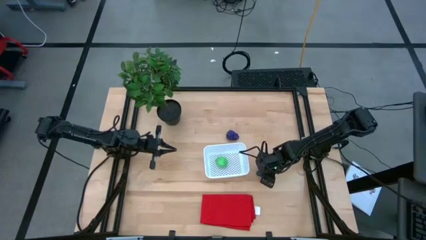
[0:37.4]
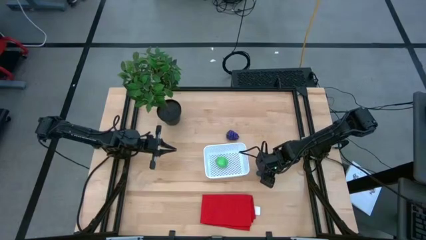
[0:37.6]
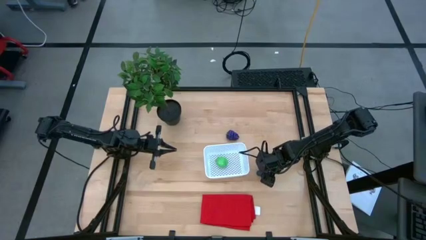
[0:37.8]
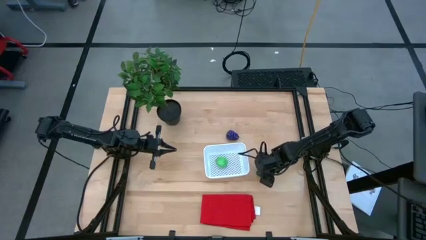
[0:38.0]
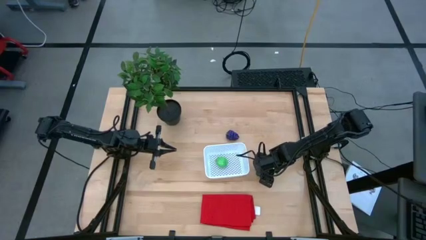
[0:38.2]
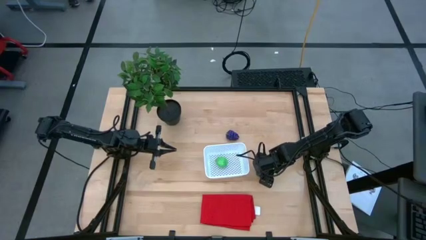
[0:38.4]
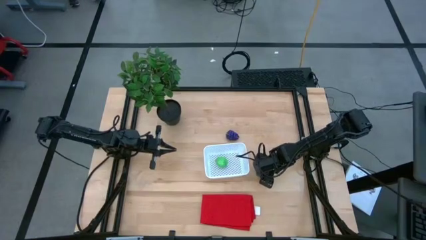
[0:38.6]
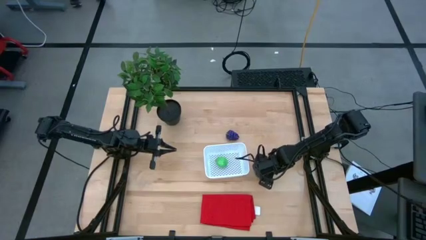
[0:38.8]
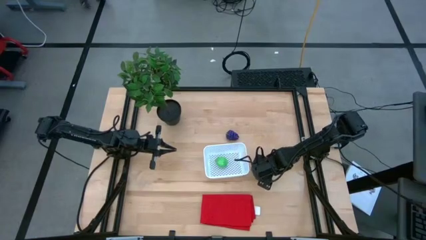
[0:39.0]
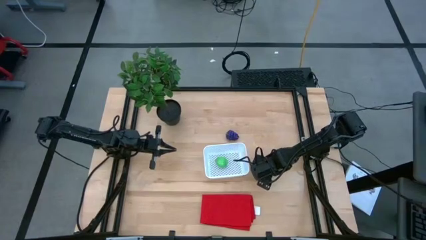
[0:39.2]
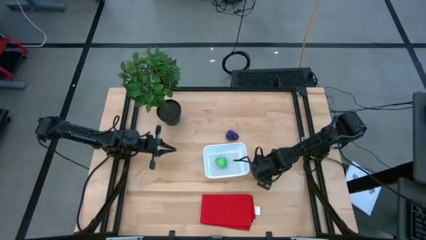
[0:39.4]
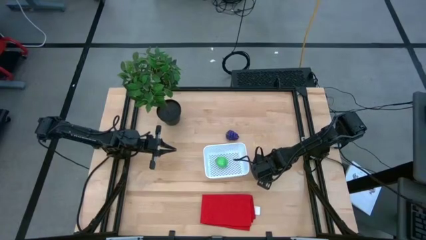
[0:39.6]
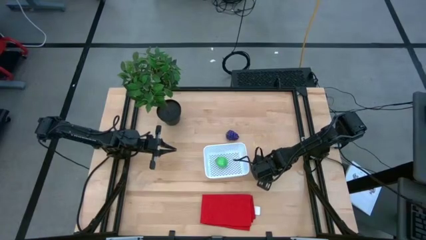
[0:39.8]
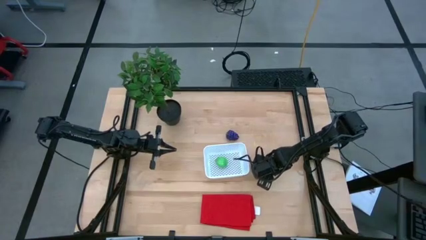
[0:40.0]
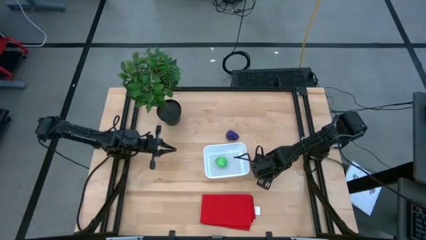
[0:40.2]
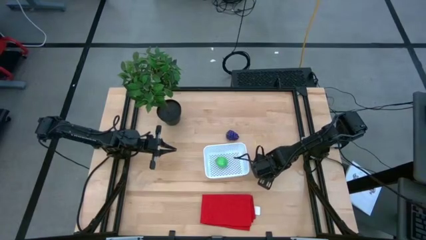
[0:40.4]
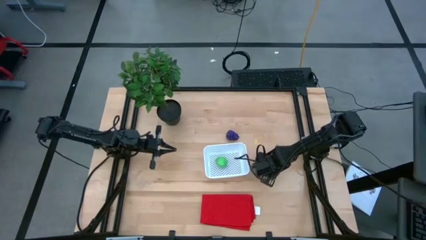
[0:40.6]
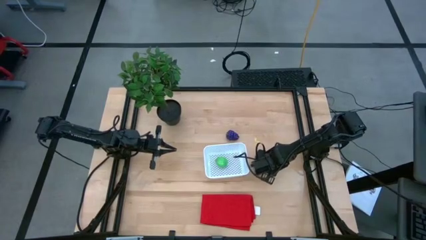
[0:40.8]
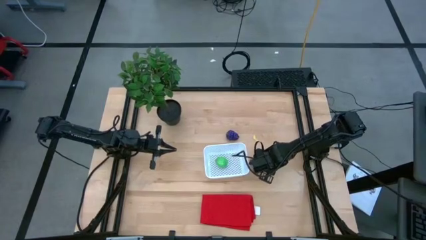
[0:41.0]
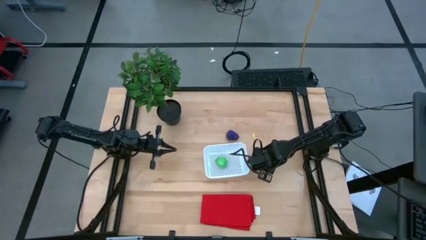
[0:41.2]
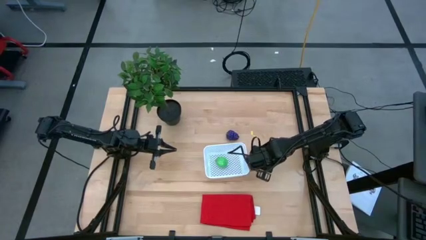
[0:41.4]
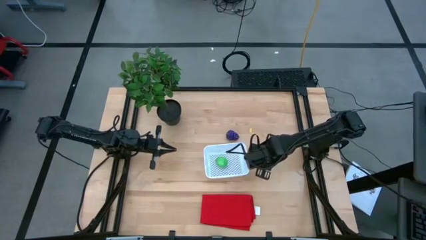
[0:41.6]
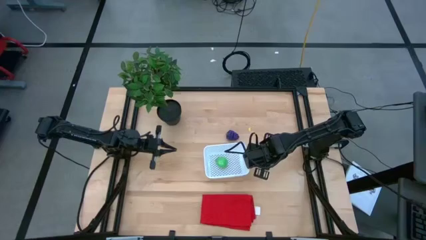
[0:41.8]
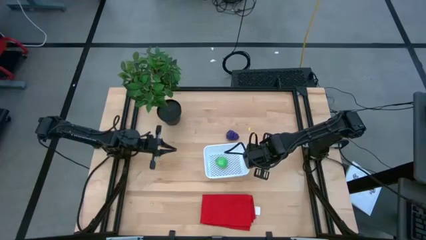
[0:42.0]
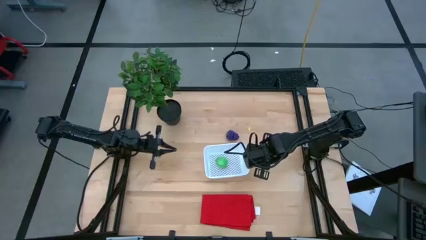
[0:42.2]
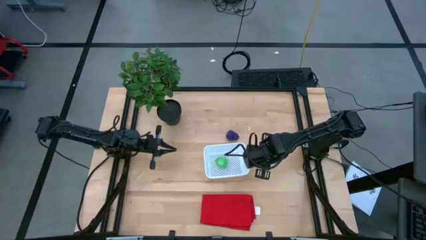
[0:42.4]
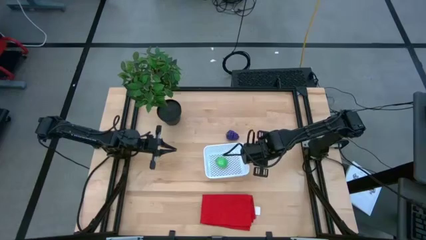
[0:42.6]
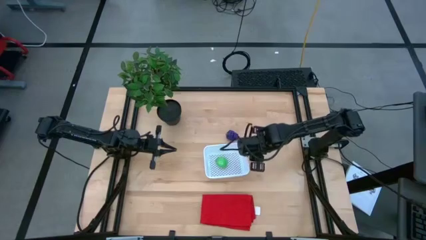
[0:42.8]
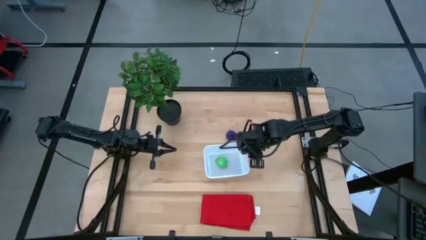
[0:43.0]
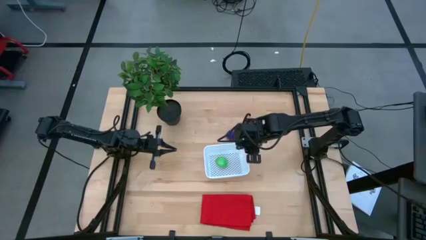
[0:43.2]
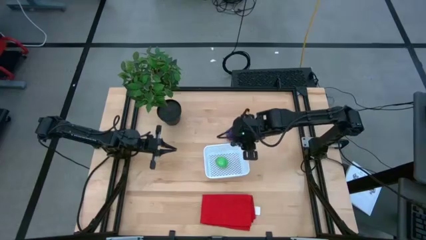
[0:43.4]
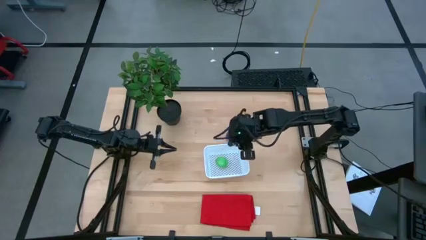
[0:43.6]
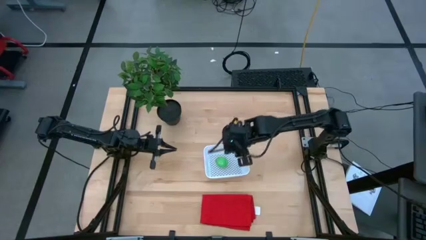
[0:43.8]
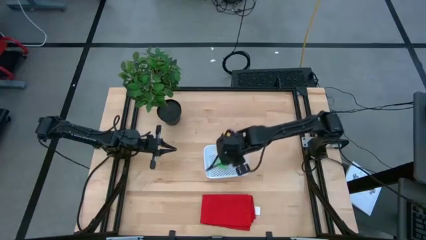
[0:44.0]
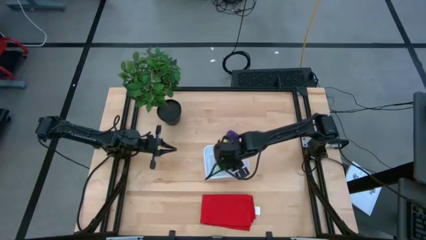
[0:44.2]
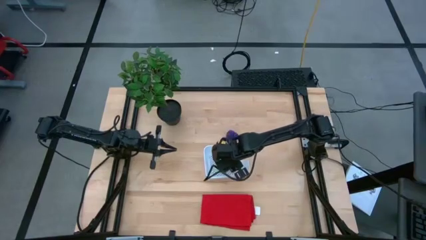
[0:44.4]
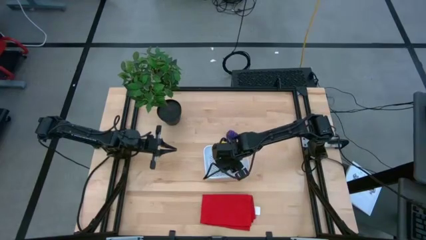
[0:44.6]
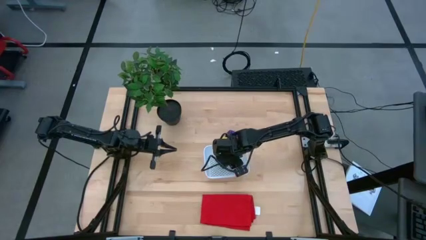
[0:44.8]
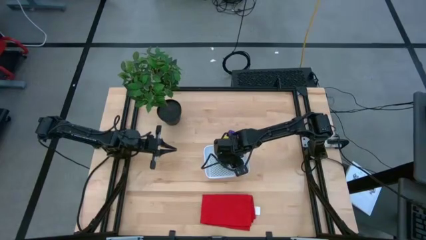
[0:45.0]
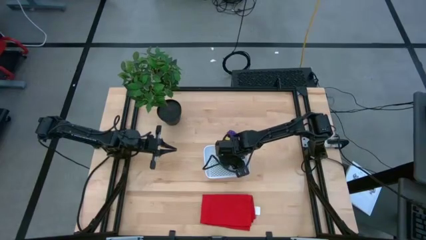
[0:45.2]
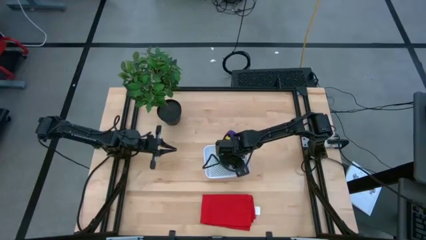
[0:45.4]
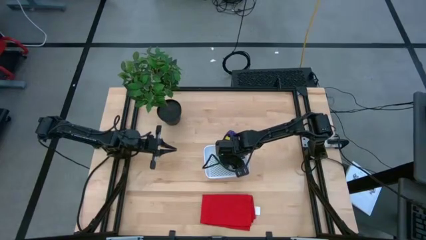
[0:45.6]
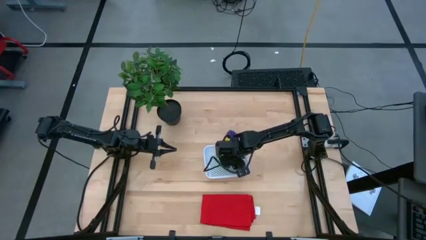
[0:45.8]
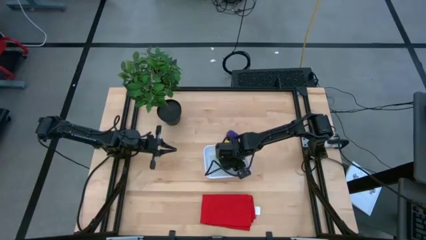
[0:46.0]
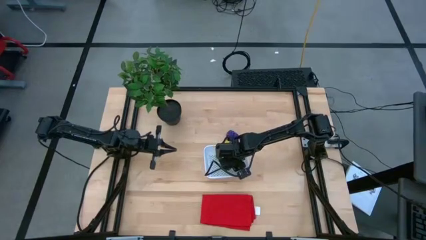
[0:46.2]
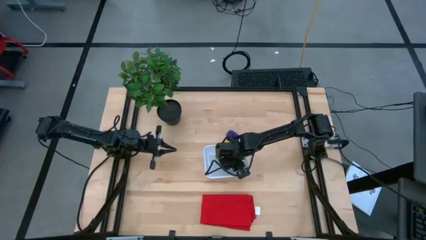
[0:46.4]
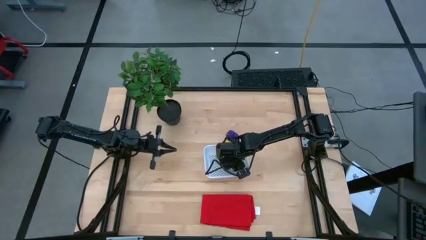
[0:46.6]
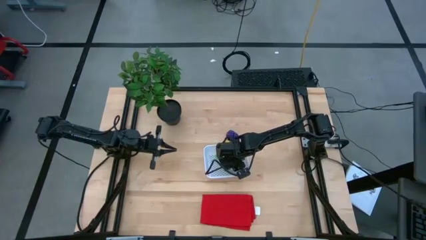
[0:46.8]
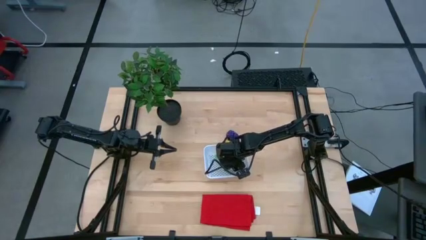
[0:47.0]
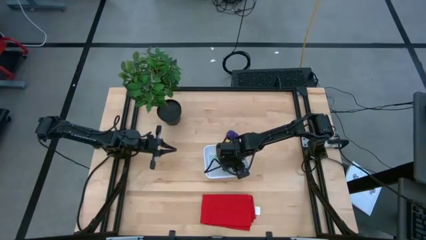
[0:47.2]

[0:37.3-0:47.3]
Task: Pick and placing Produce into tupperware
Put the violet eggplant into the white bin

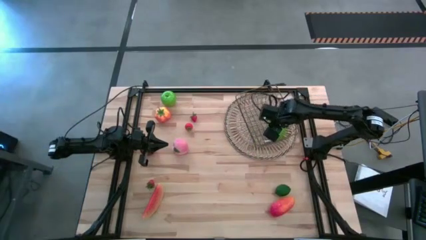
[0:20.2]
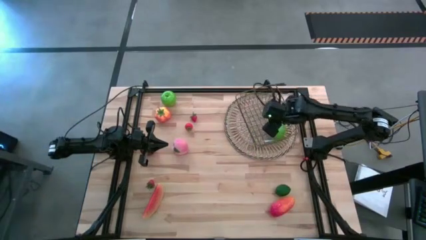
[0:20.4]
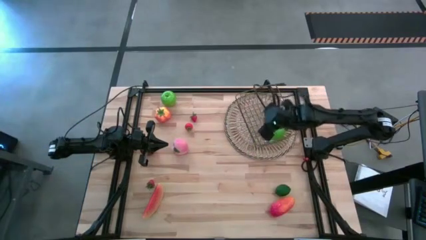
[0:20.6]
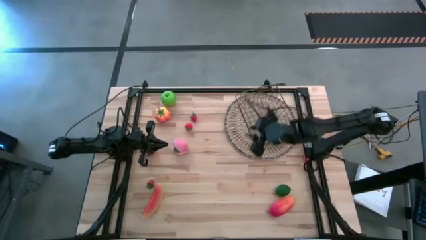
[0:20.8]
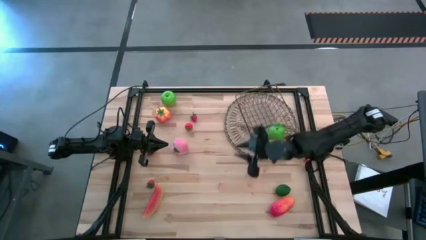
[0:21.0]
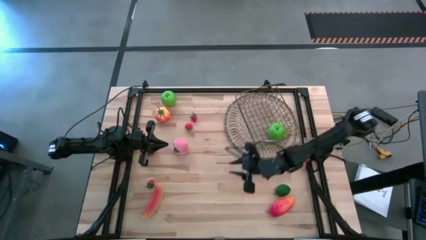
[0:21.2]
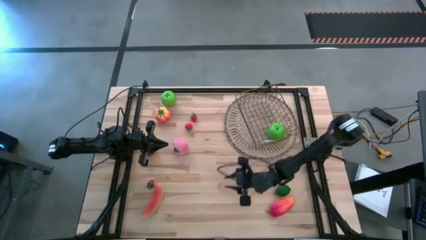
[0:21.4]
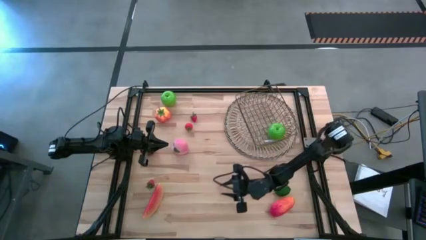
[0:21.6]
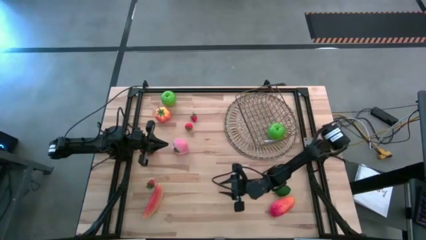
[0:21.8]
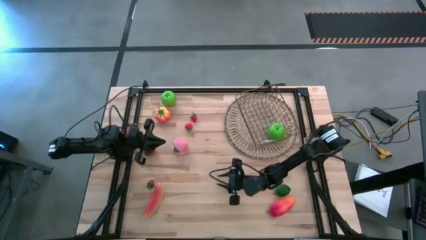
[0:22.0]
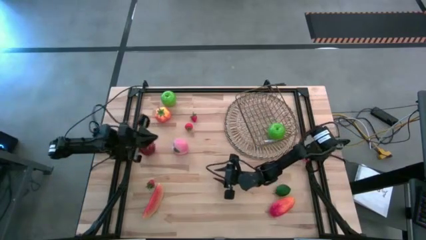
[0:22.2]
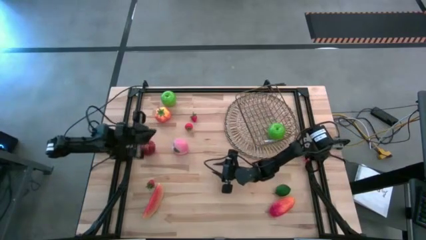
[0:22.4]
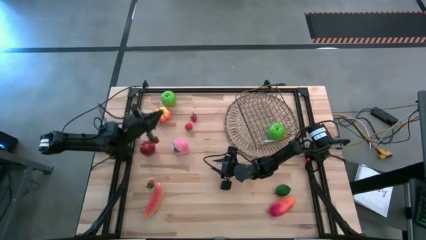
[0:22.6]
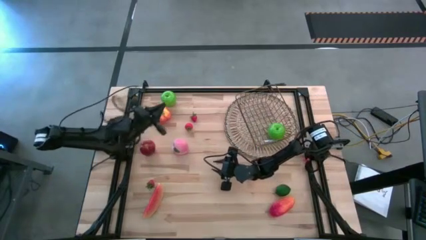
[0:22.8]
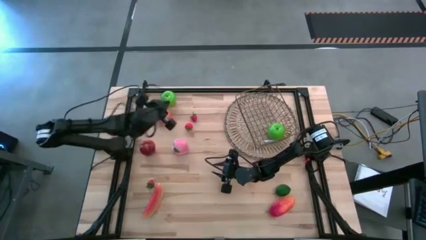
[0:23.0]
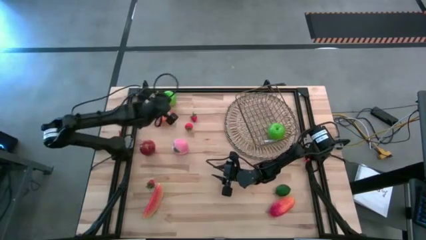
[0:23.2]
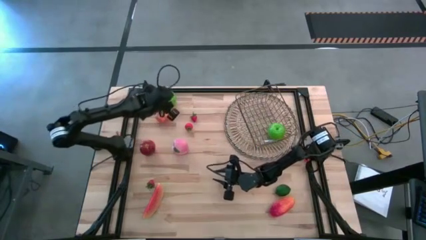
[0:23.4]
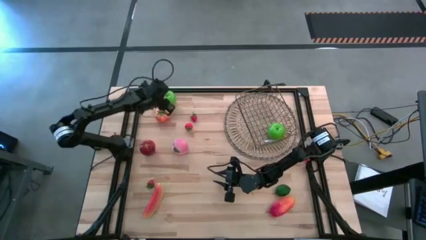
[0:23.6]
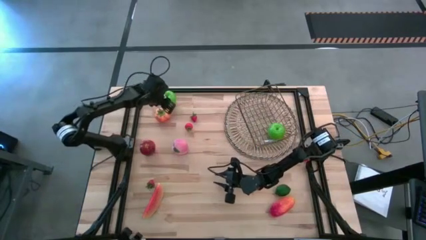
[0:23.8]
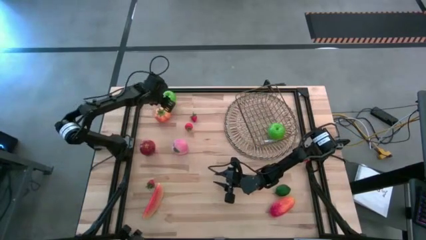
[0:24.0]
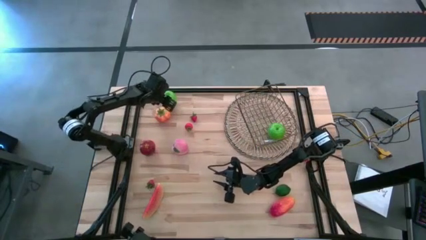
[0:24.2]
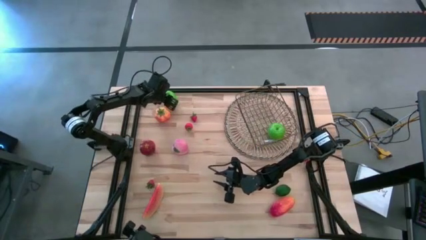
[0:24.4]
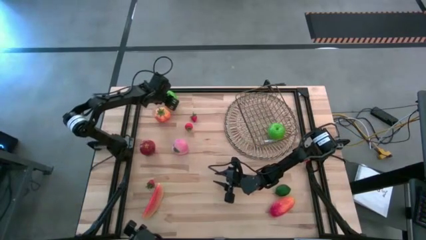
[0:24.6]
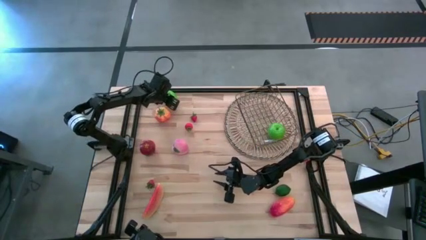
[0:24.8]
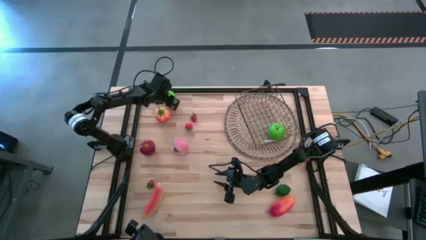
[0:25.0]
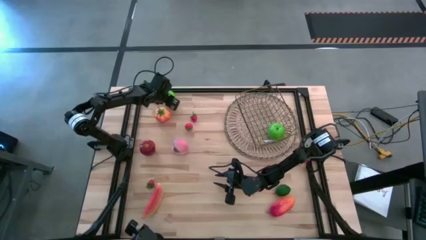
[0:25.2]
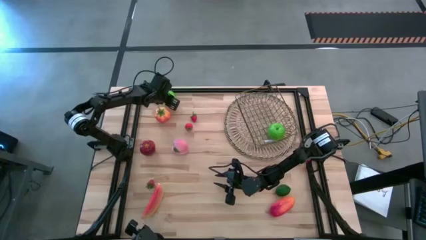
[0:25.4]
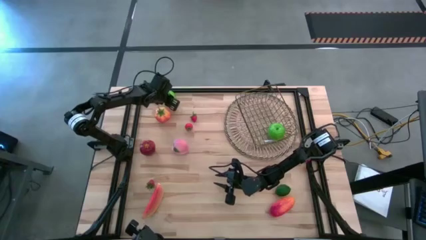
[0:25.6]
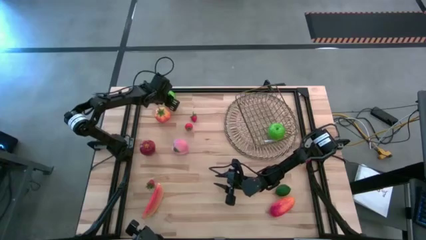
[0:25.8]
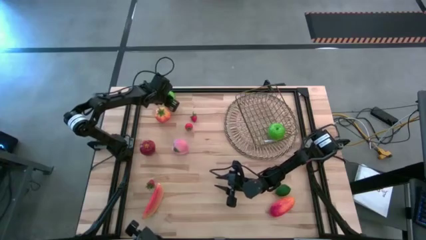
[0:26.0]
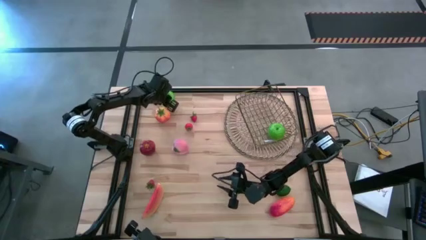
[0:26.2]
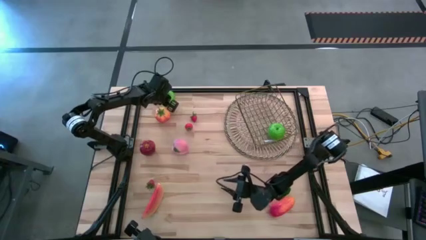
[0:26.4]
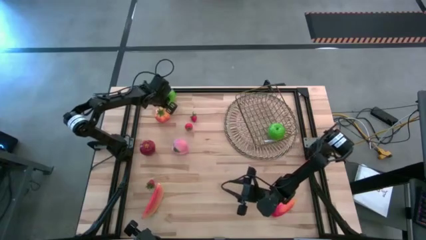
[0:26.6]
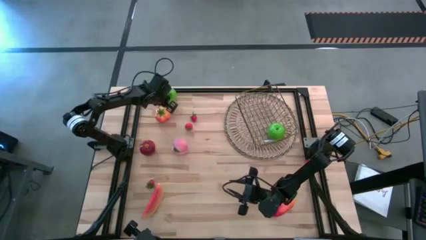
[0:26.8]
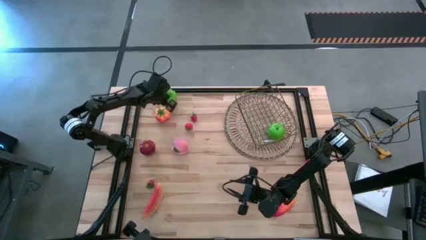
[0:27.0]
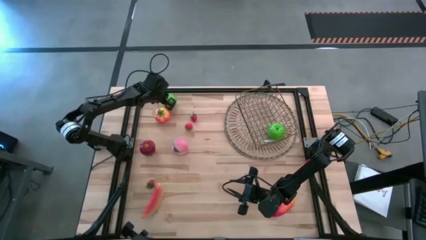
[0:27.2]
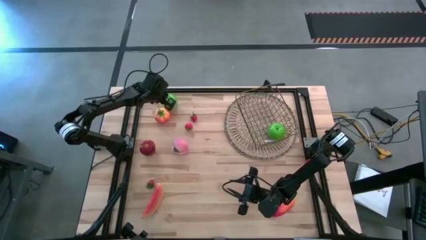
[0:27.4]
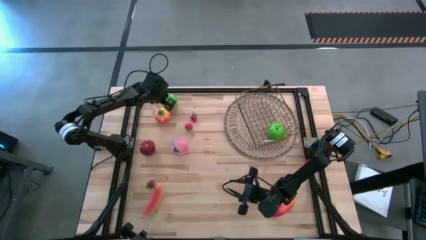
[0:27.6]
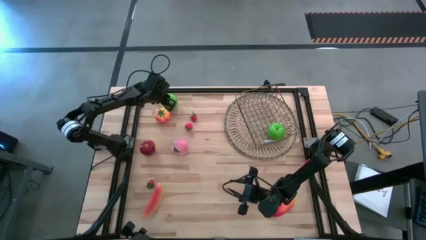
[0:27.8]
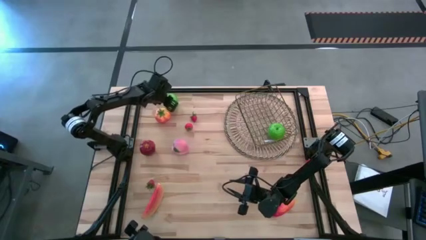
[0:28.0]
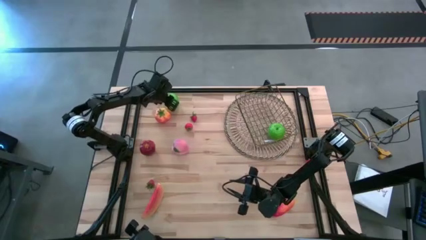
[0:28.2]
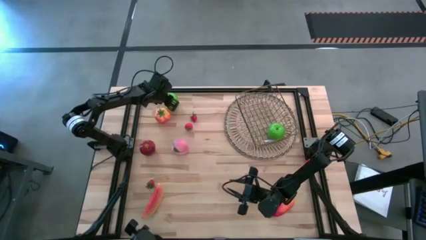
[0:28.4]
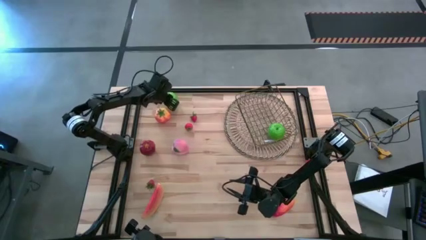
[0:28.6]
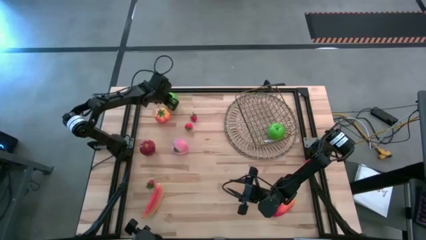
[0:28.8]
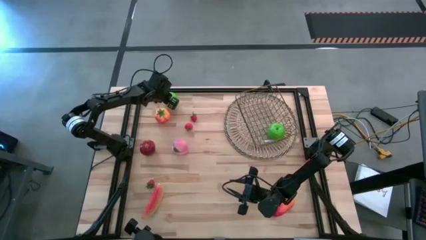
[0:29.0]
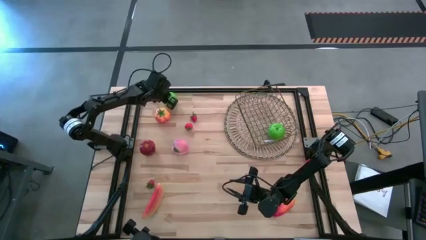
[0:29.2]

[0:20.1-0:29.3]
Task: Build produce basket
Put the green apple into the gold wire basket
